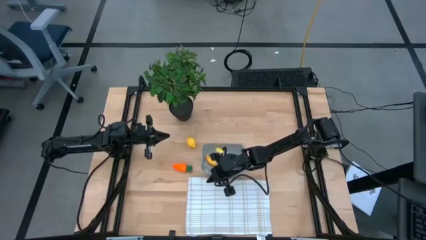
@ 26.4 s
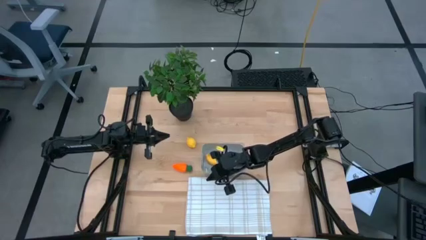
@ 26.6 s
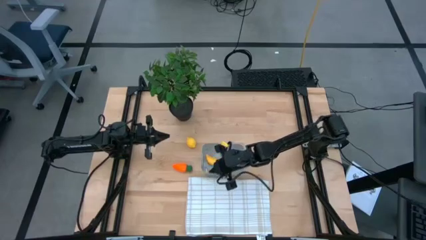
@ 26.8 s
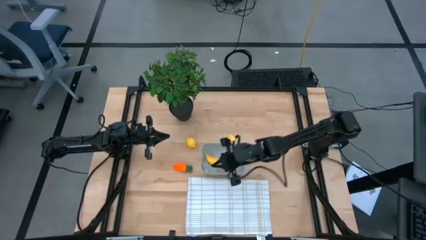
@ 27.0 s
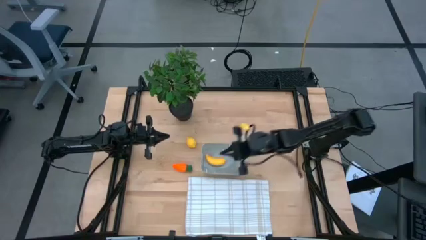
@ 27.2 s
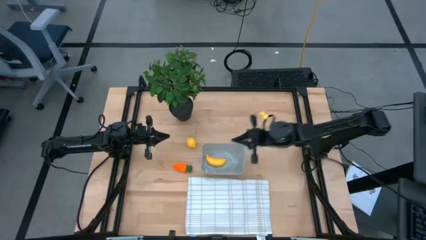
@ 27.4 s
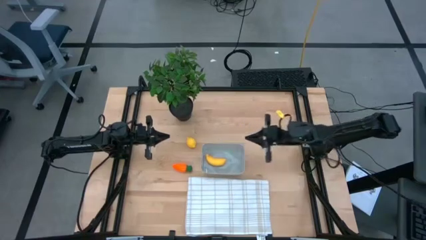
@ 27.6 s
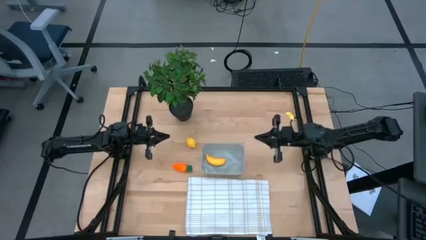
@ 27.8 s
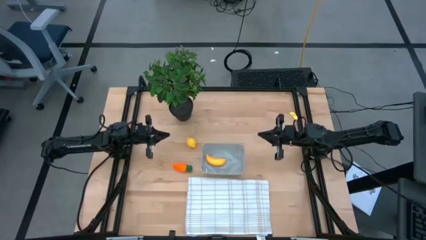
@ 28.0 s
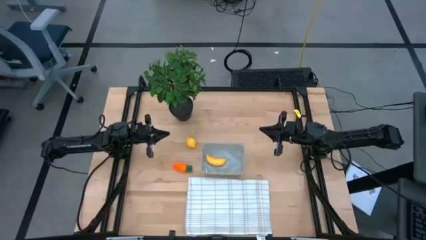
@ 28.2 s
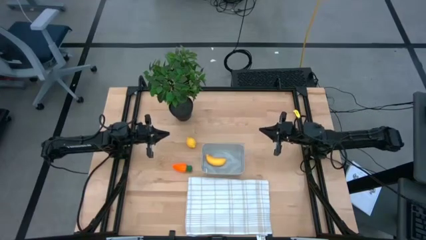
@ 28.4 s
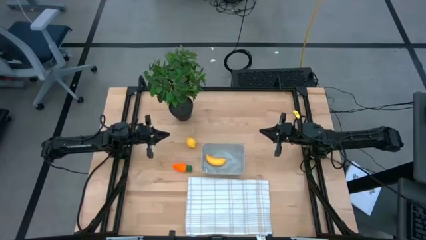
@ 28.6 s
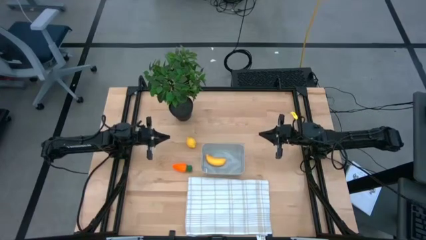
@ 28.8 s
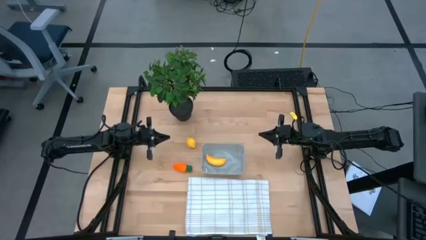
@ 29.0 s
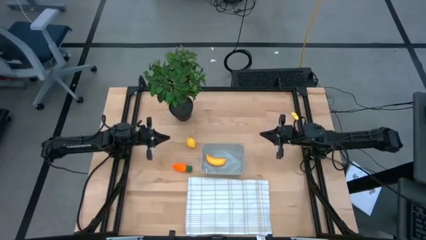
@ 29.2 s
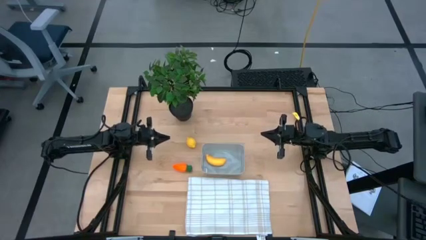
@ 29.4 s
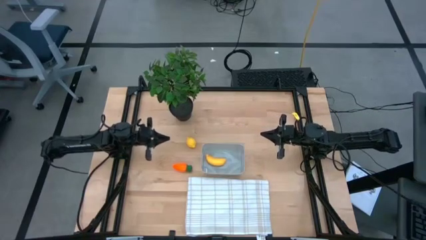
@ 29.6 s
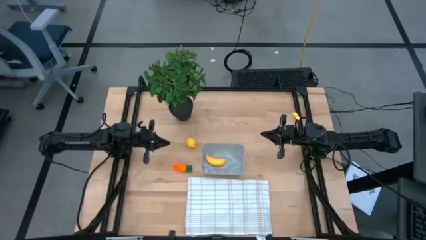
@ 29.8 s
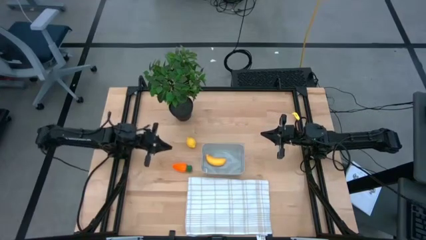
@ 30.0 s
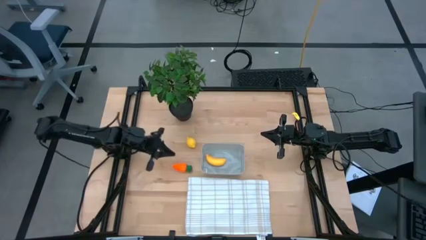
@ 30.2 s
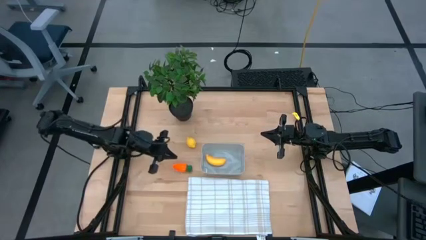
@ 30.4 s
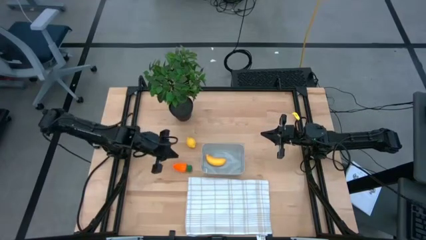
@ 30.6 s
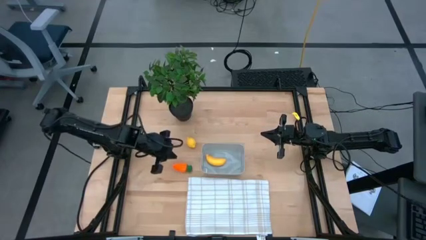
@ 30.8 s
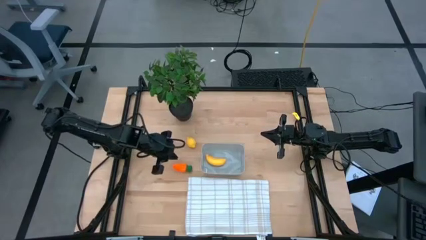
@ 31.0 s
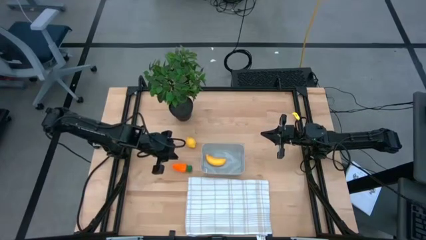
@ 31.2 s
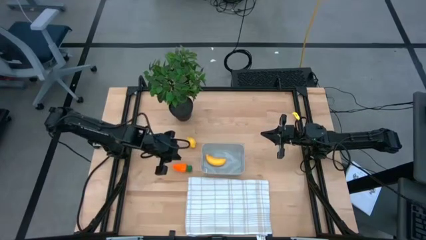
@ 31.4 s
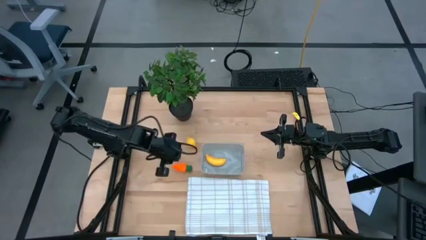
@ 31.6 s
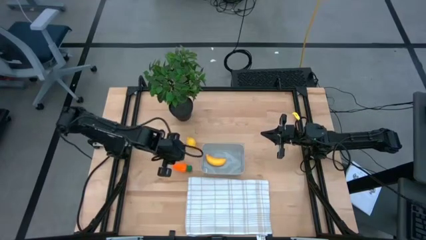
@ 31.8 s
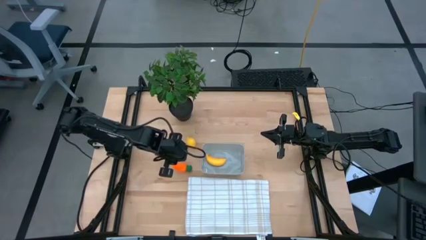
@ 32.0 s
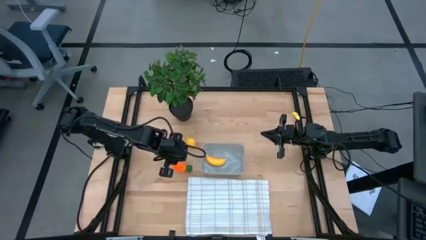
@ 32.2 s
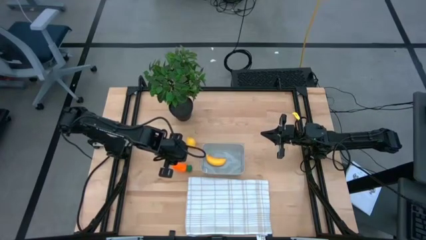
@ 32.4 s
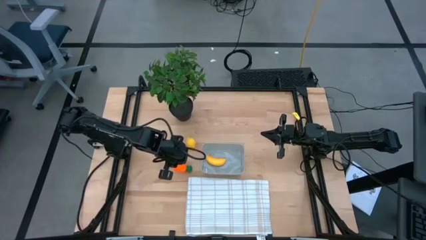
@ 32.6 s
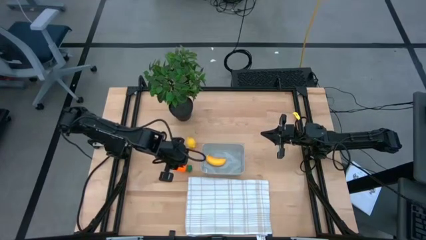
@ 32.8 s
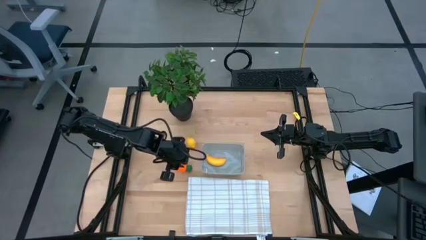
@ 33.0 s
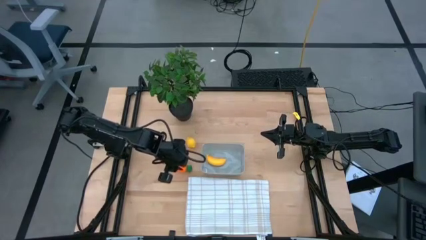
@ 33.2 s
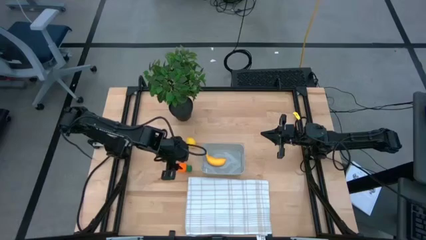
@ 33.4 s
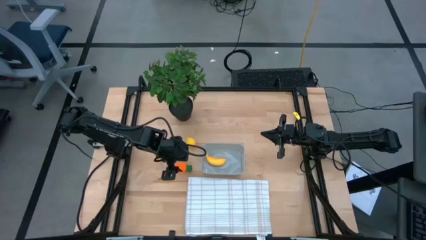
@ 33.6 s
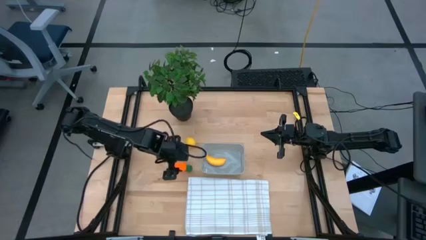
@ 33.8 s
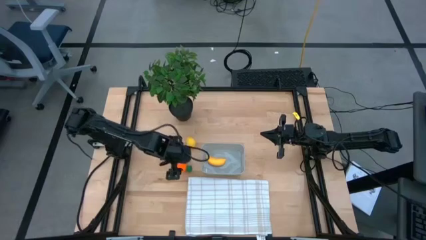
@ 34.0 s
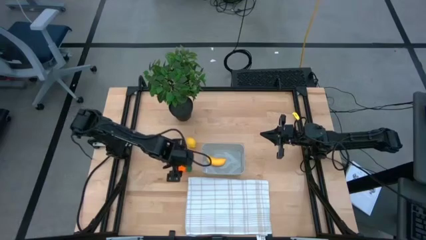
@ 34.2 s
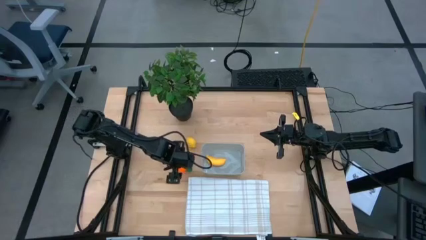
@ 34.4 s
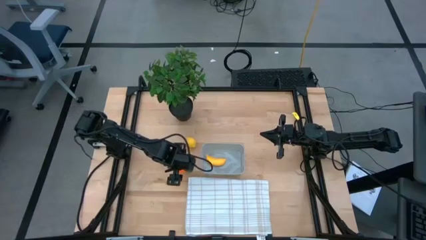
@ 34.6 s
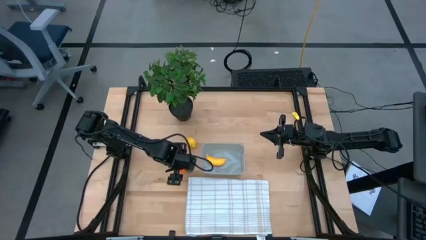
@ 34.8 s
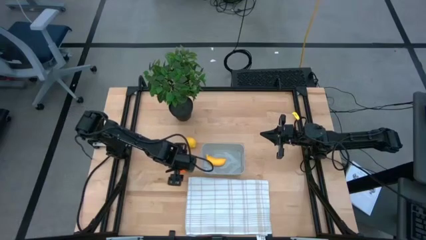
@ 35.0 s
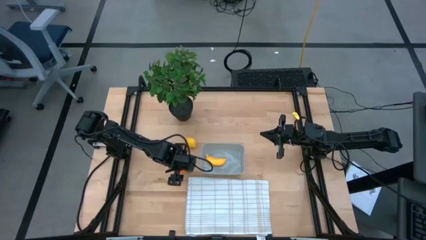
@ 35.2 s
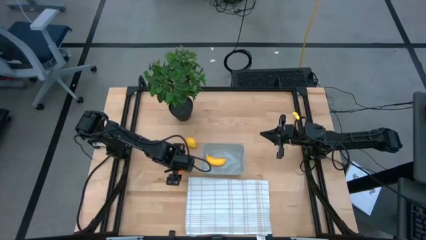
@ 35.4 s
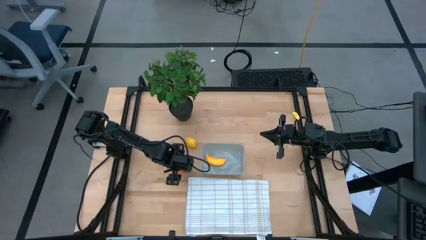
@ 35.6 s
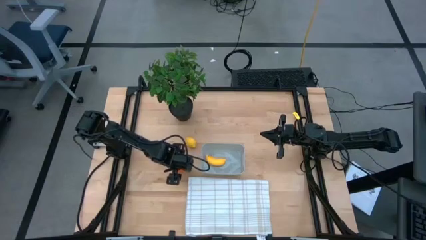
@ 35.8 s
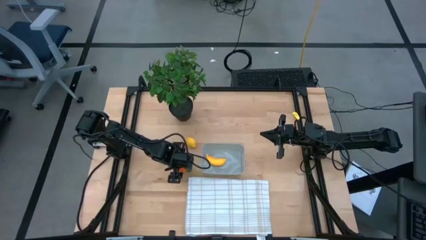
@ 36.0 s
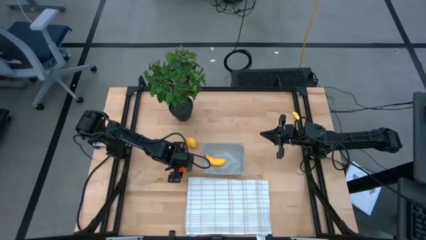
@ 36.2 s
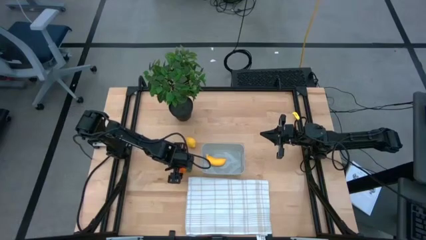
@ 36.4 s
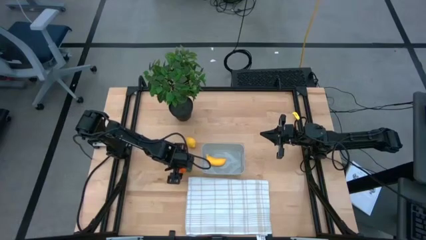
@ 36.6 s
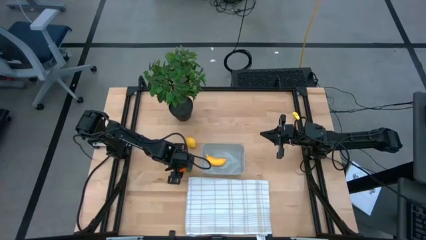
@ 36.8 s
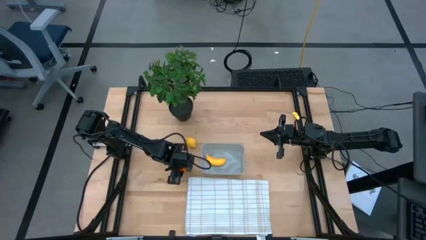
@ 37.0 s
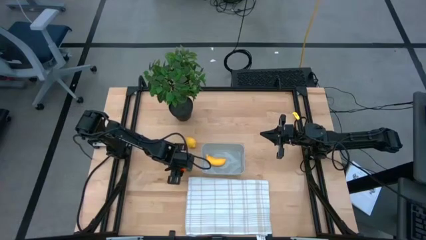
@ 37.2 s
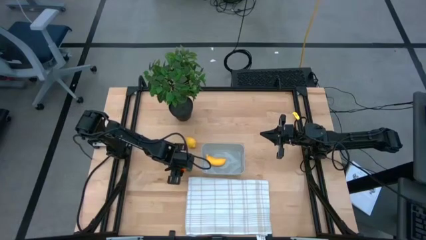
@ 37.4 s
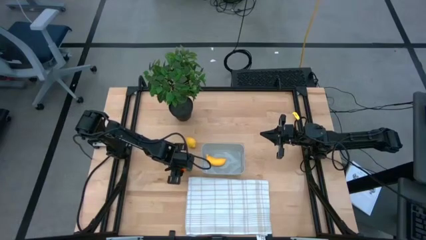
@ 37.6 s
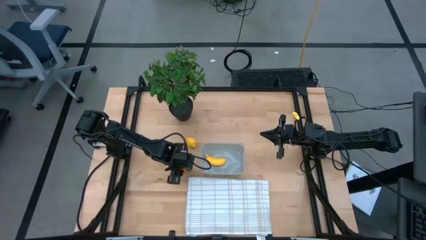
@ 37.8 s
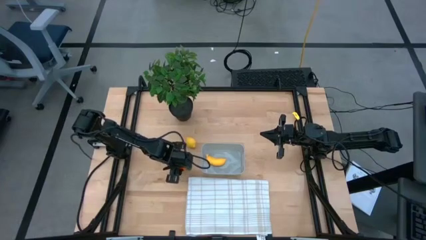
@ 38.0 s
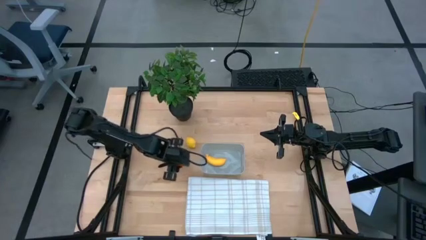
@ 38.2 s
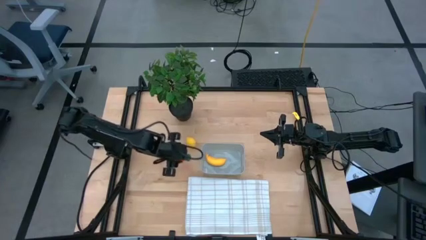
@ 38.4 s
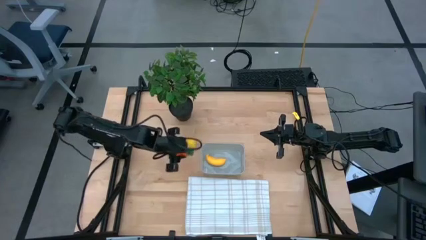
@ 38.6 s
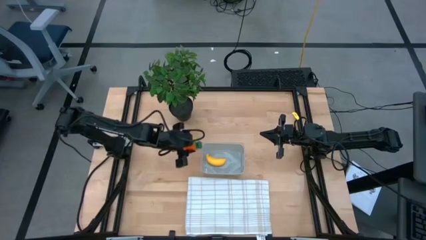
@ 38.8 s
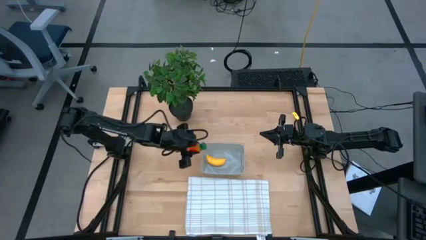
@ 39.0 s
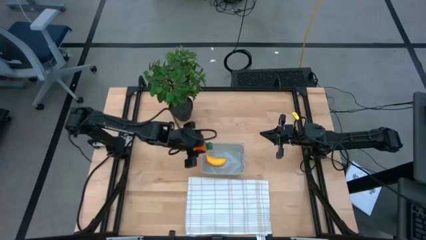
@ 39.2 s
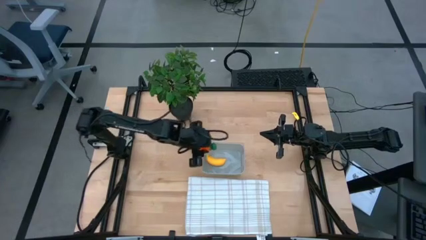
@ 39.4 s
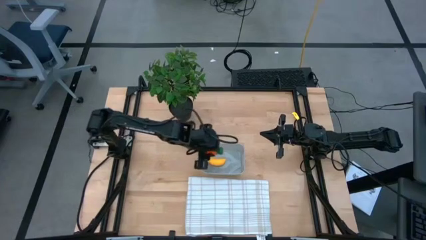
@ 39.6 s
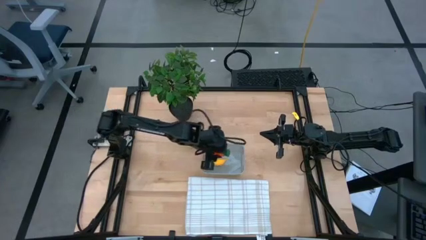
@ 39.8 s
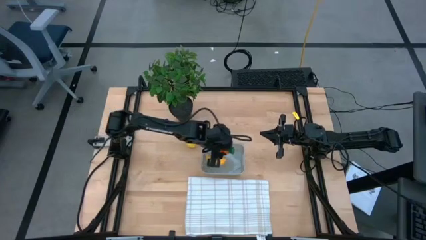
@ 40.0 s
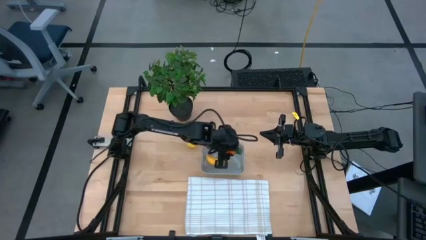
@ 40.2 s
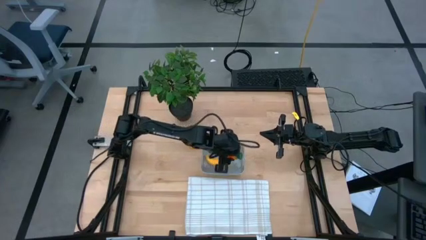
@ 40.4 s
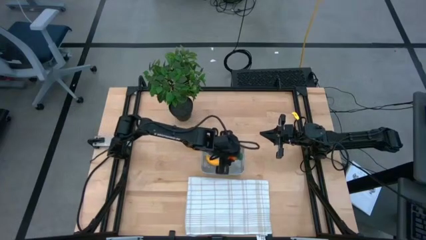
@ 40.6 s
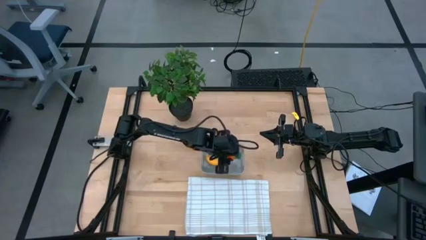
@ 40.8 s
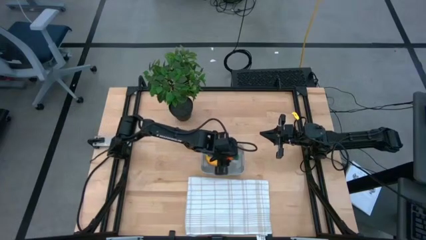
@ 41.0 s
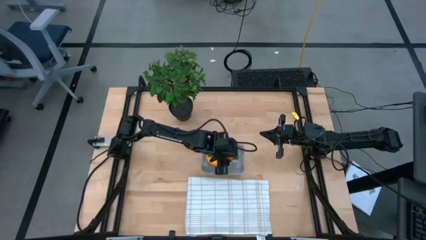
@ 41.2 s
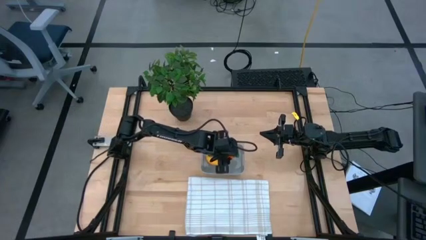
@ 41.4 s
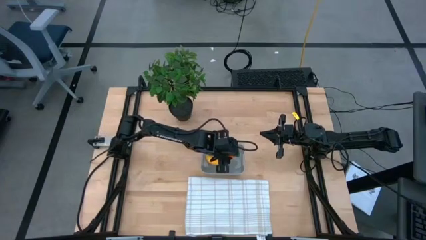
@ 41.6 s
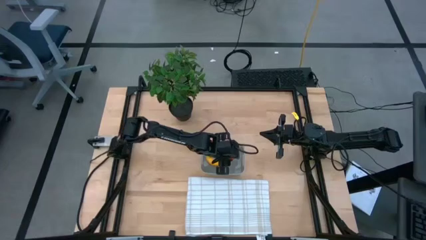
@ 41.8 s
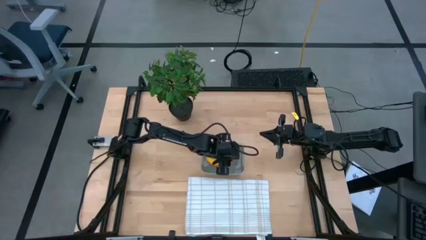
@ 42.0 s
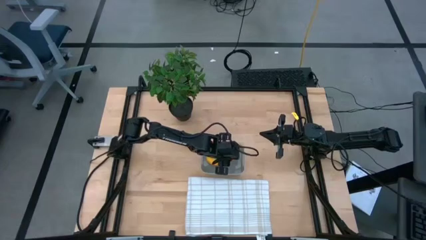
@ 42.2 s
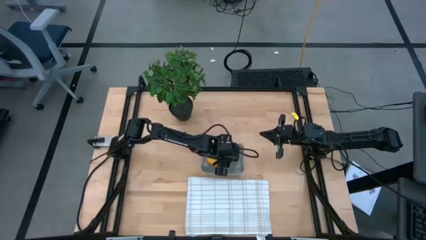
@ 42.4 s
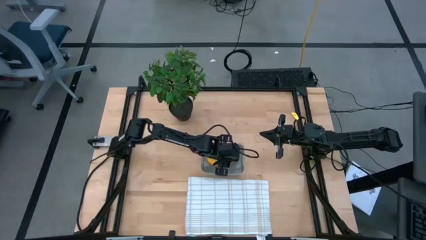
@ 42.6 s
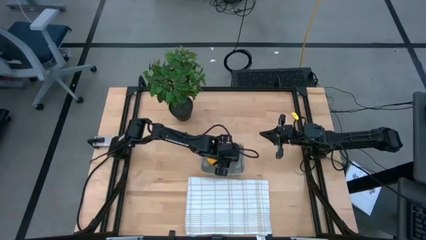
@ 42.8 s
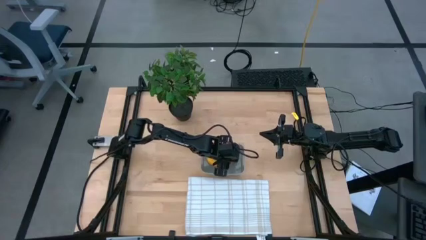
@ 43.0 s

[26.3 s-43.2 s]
Task: Pick and placing Produce into tupperware
Put the orange carrot into the gray basket
